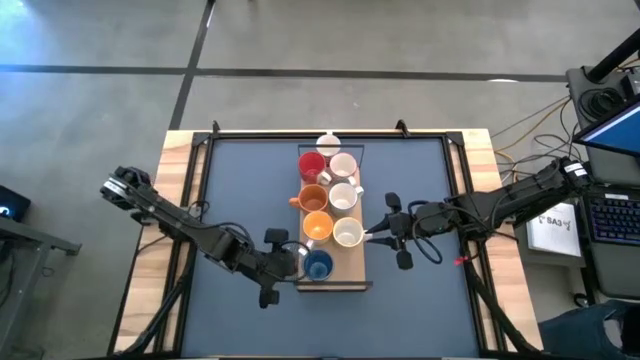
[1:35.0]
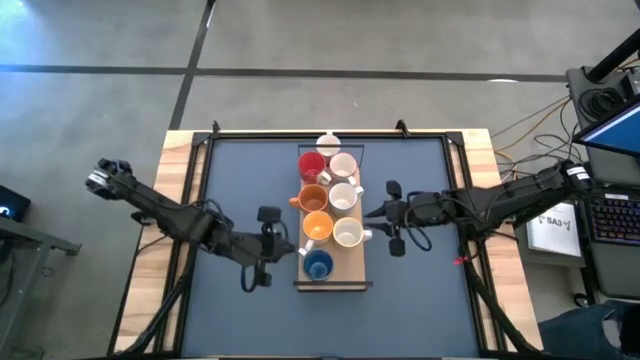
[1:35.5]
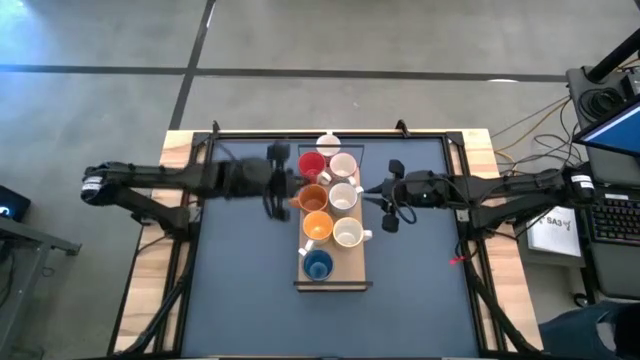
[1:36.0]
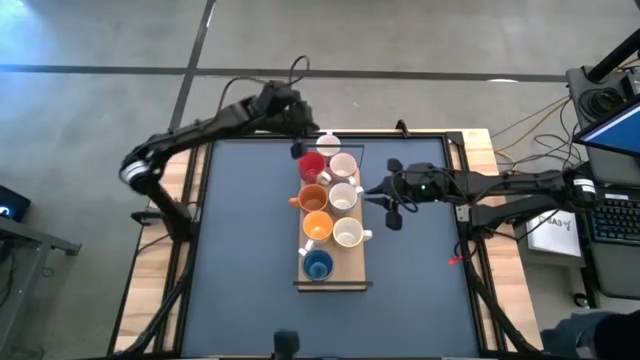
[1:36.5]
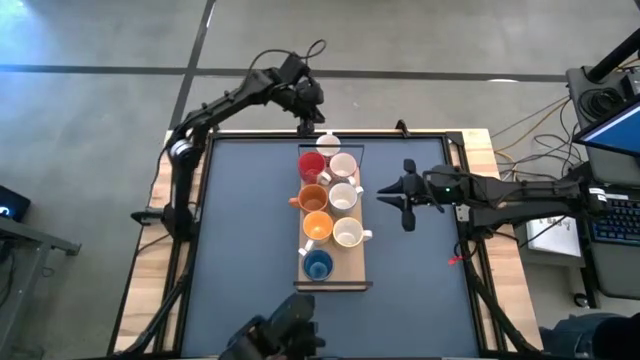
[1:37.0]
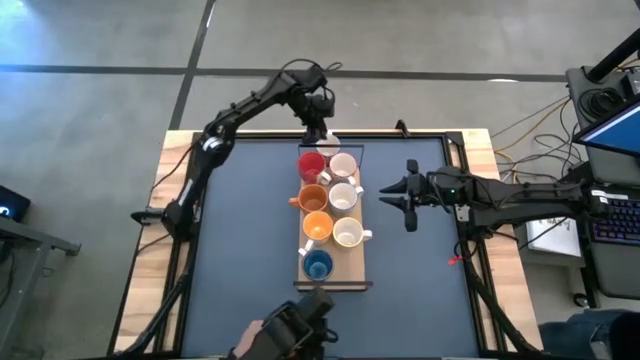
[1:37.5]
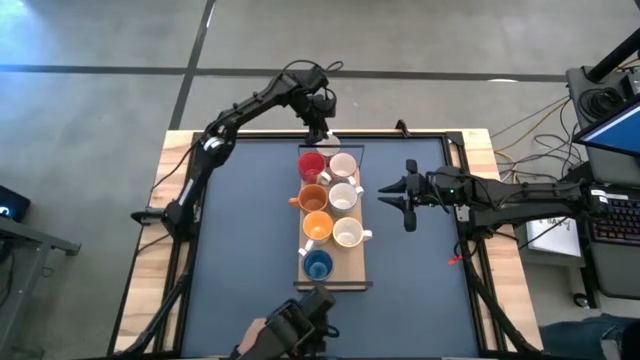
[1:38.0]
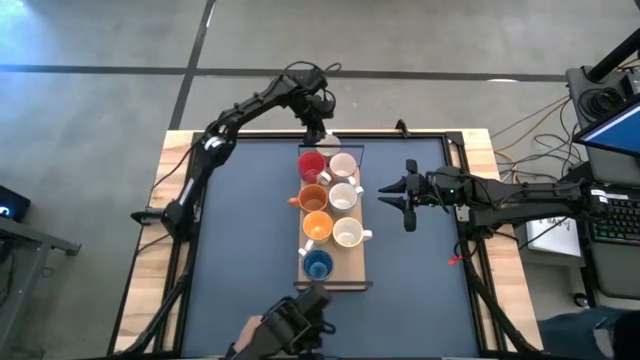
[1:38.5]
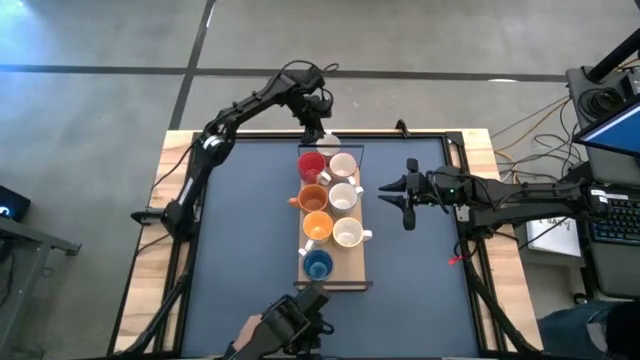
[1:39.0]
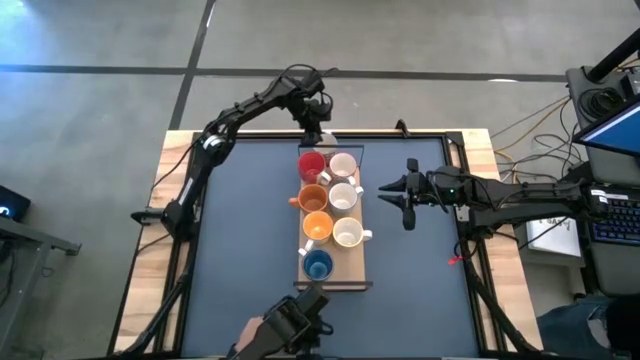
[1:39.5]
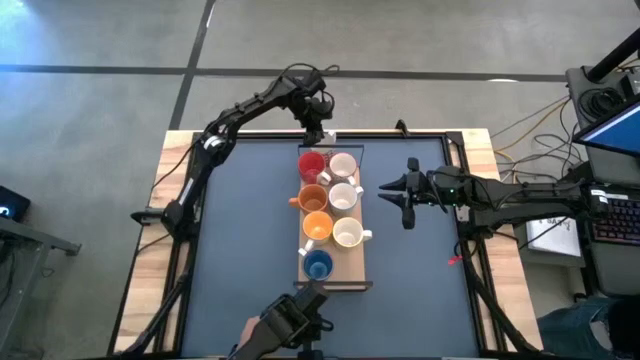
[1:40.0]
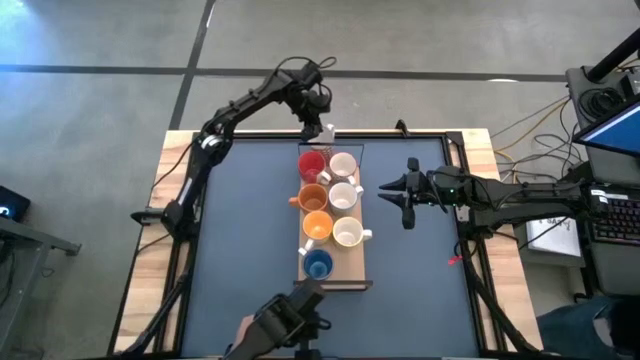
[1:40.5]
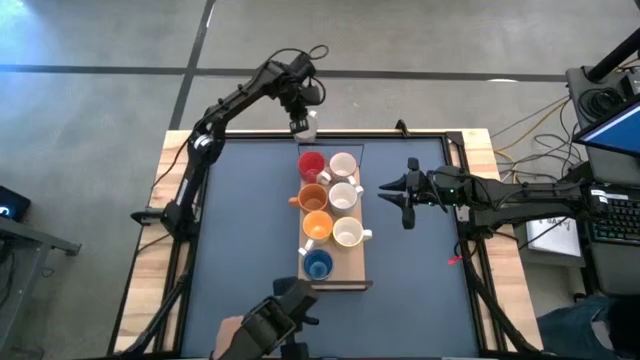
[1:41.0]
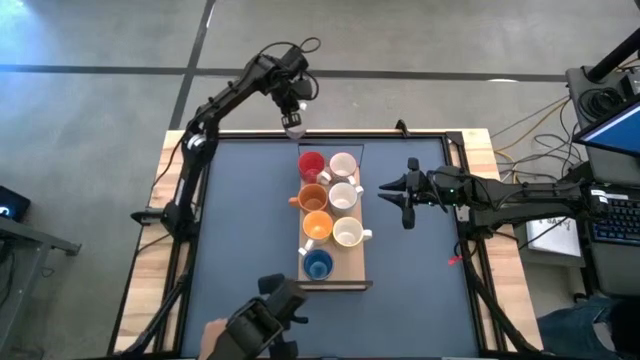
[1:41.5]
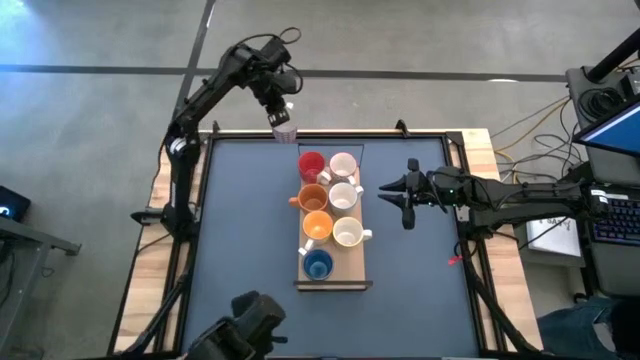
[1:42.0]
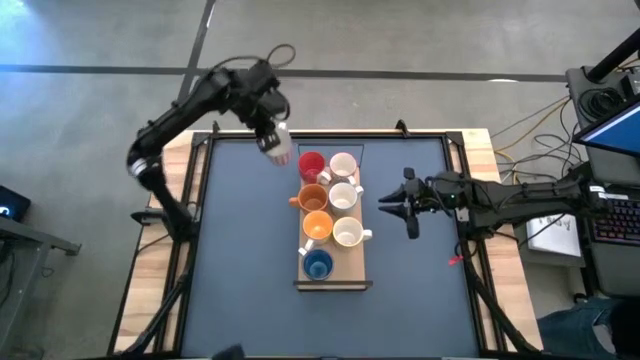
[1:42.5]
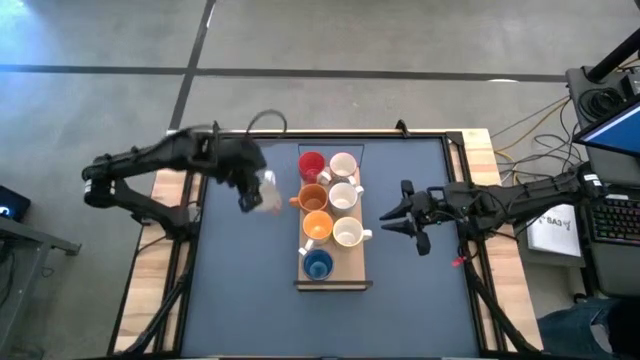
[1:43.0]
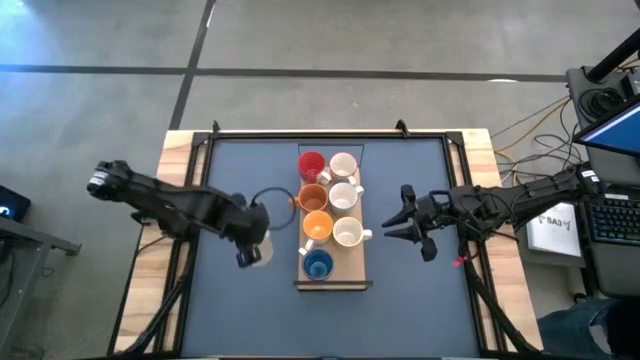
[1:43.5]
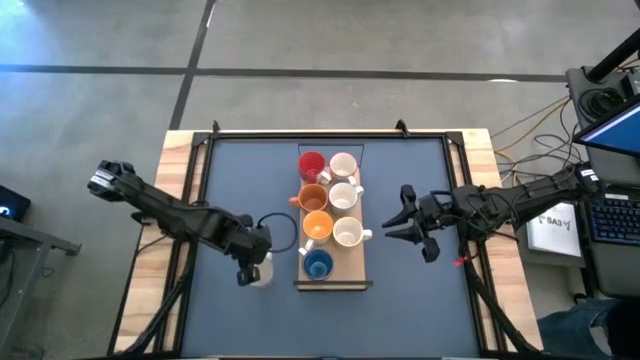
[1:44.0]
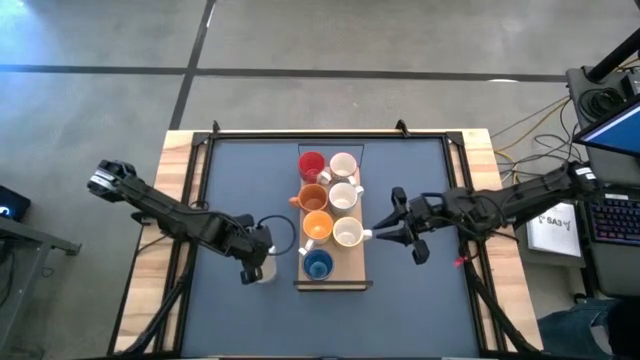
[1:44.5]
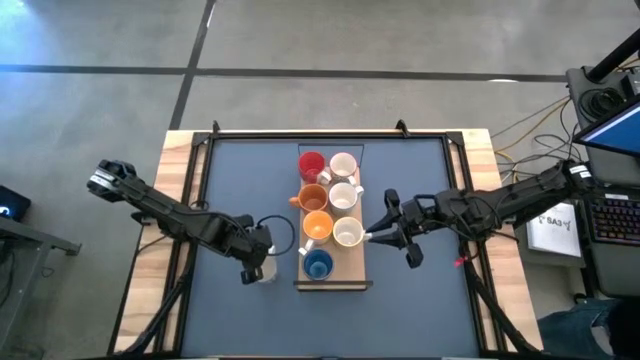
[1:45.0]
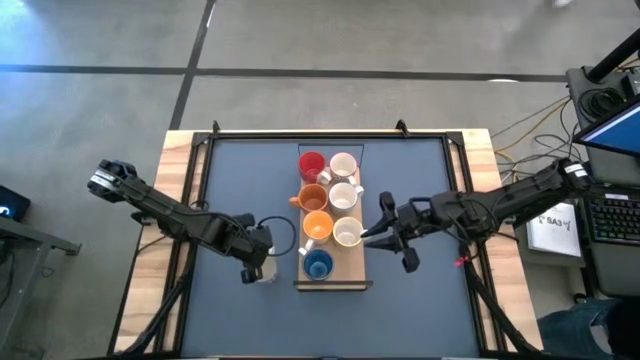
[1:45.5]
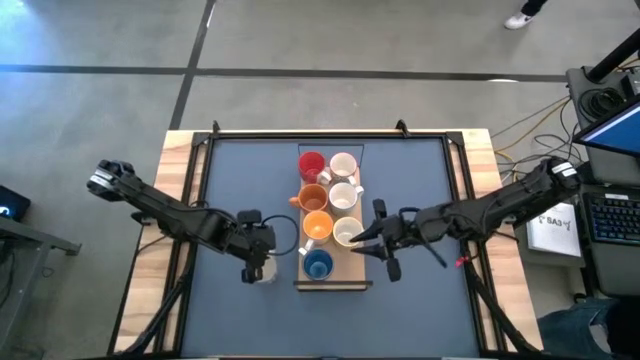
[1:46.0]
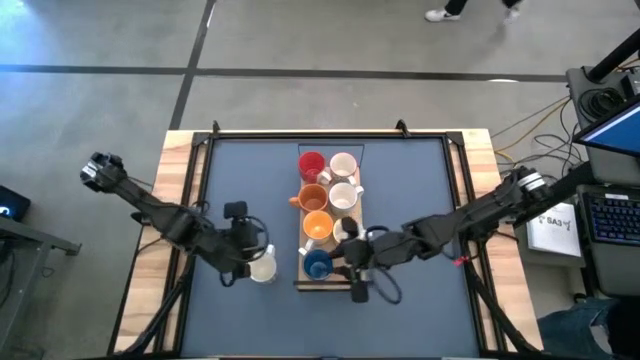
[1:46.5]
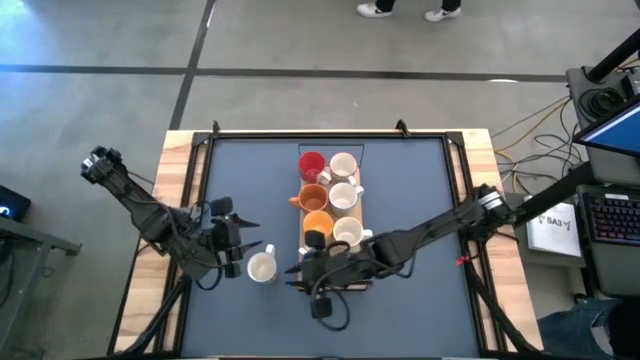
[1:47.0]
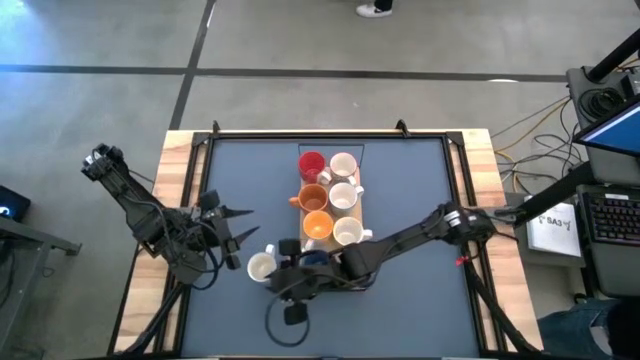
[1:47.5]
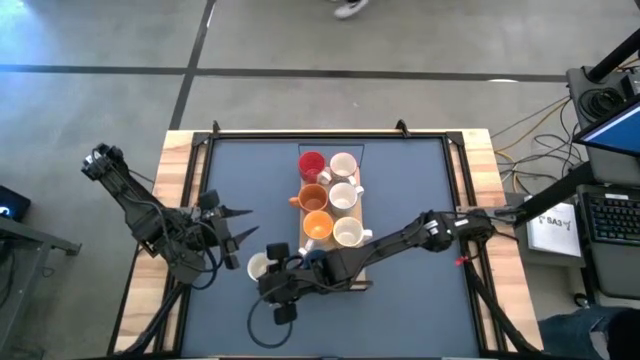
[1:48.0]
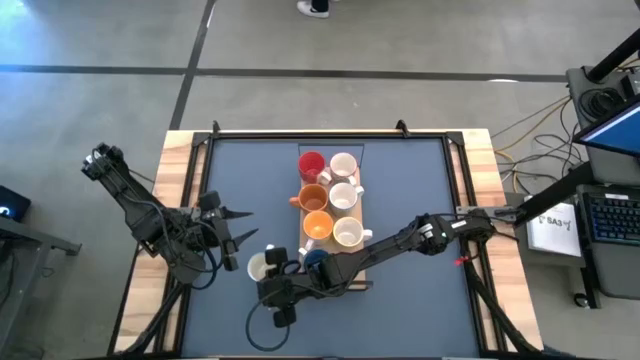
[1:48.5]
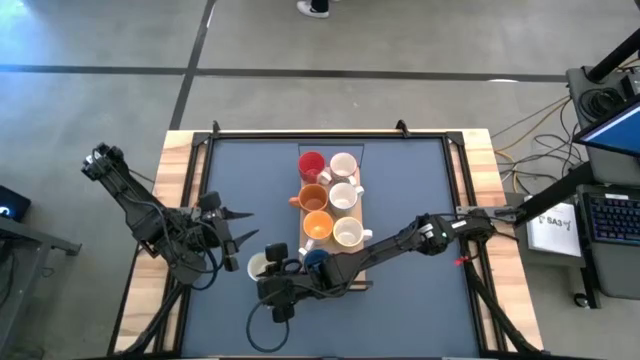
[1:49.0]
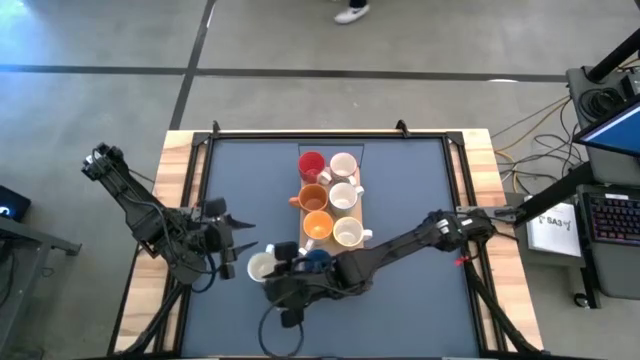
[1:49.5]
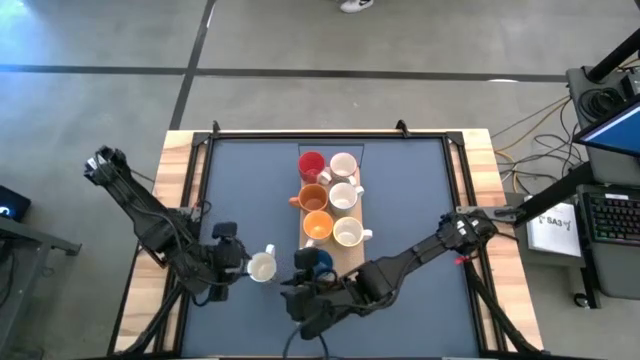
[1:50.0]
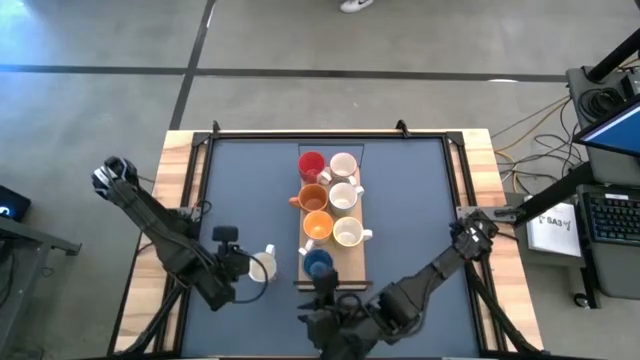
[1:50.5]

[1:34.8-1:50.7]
Task: Place coffee mugs
Put the red patterned mug on the shelf
